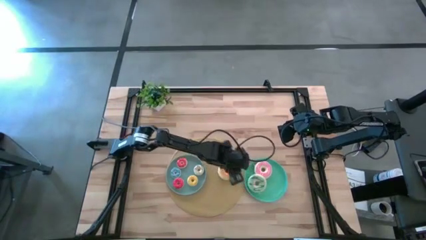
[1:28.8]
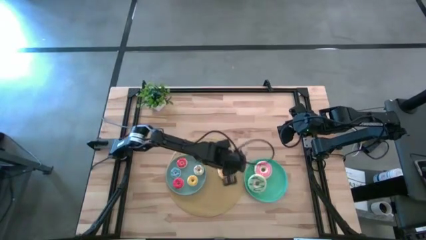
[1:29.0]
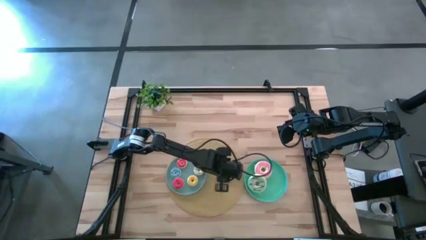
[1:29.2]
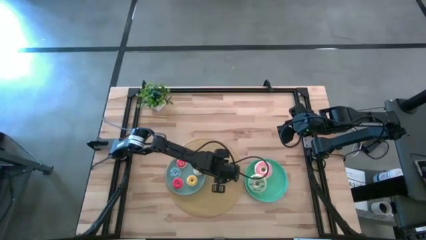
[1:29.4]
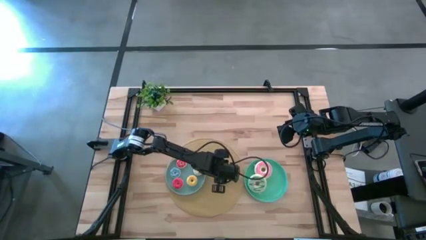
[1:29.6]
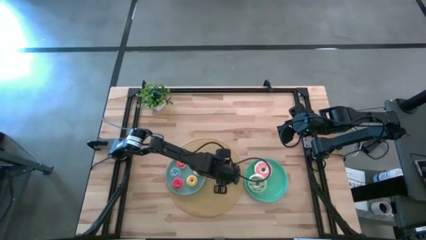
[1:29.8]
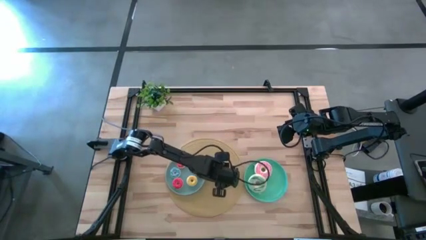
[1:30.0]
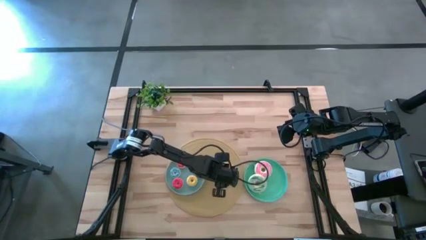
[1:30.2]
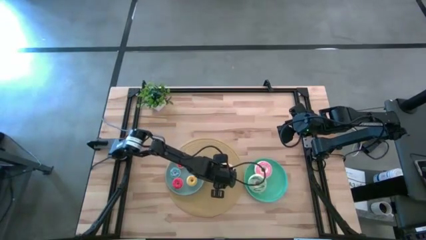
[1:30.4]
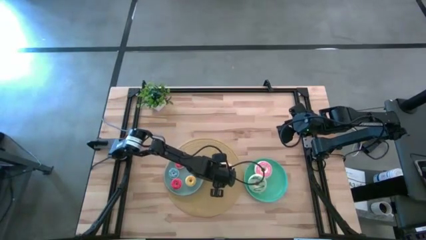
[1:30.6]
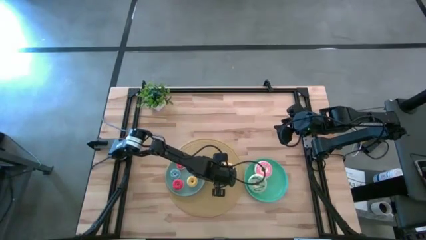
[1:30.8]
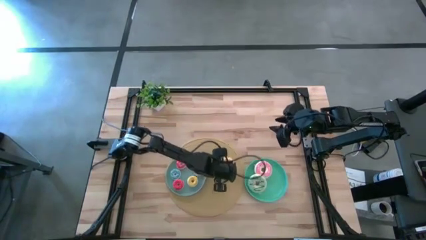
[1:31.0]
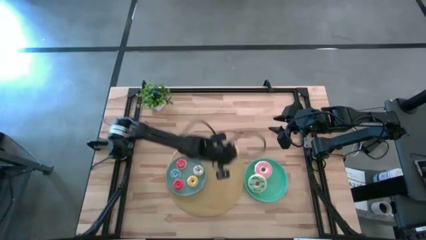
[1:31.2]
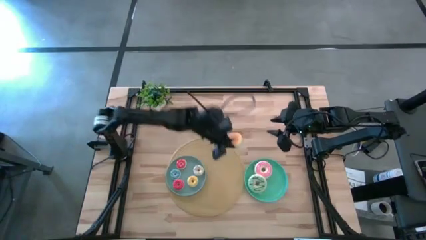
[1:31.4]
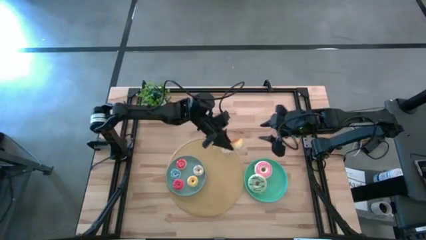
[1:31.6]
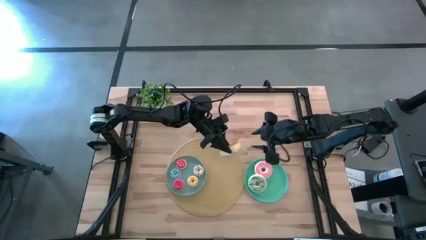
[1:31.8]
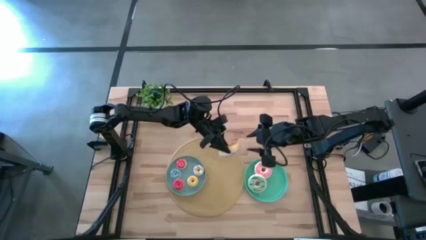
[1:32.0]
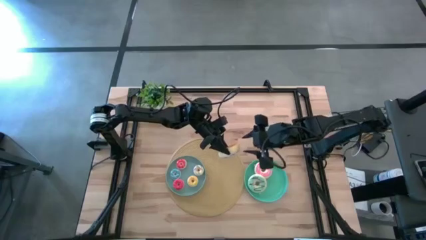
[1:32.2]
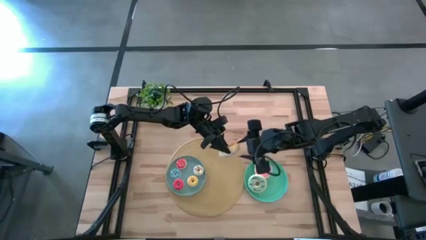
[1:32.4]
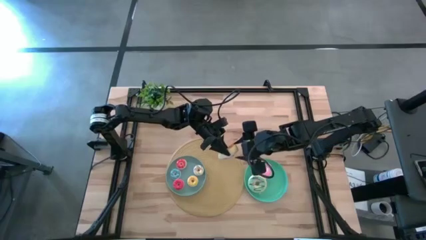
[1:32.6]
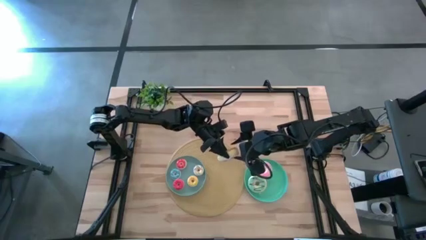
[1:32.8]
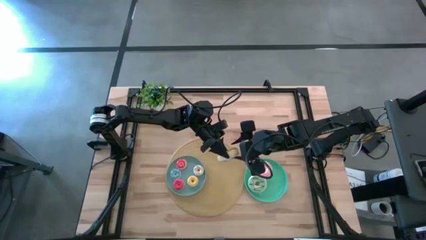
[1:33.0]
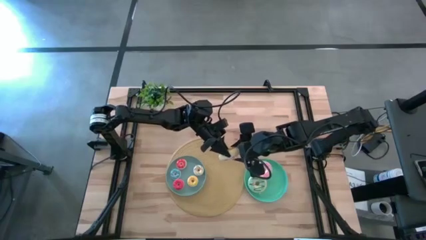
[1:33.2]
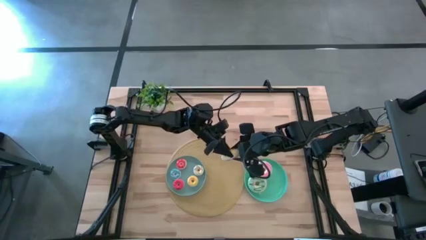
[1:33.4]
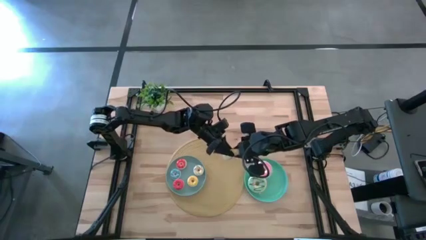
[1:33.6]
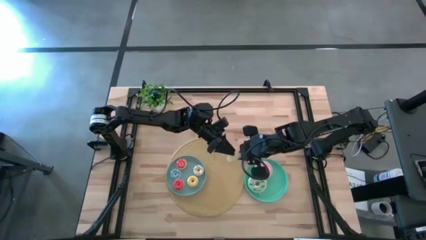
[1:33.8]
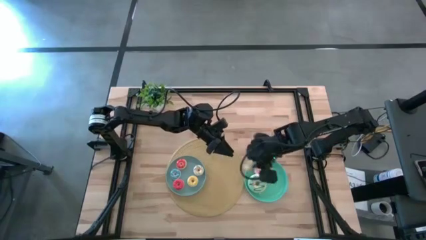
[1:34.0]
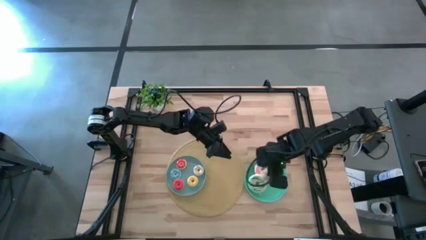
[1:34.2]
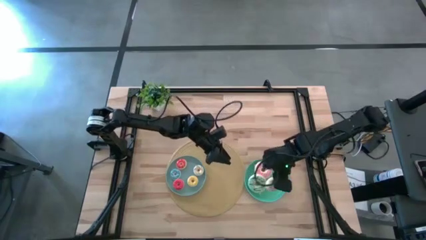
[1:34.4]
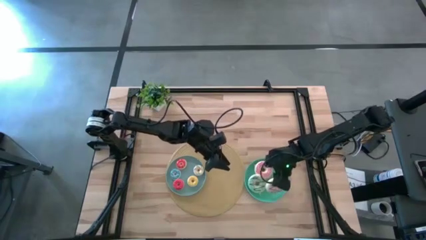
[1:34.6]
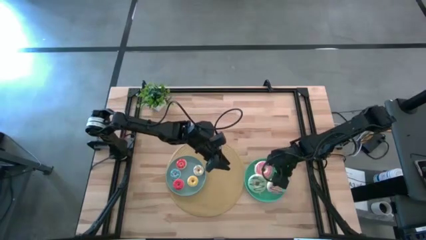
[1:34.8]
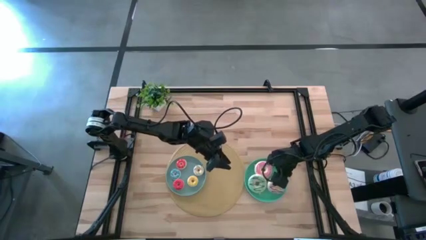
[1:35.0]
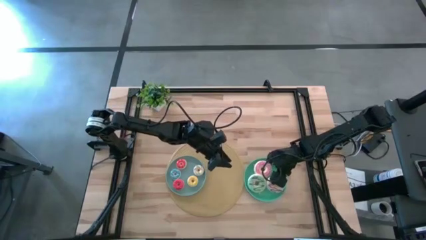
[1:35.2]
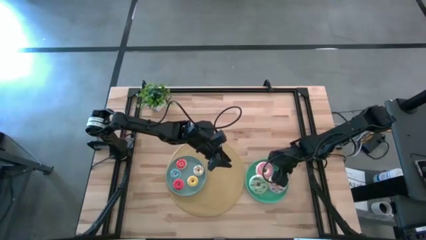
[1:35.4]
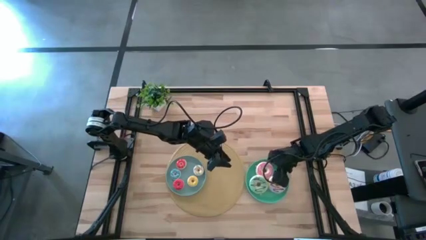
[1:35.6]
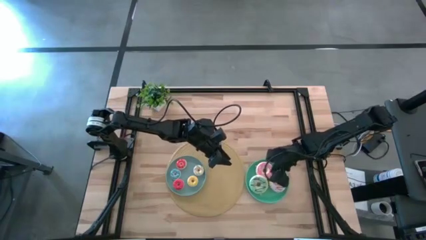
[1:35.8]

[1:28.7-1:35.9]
Task: Pick & Place donuts
Put the large white donut on the green plate

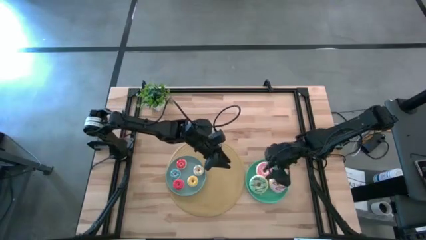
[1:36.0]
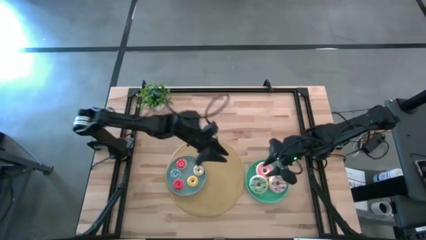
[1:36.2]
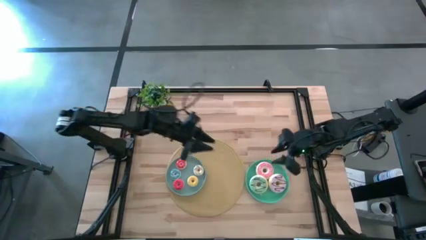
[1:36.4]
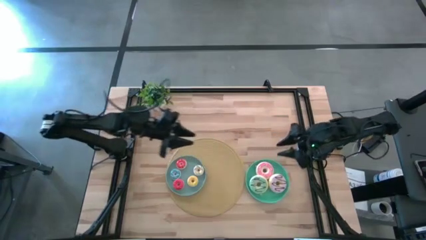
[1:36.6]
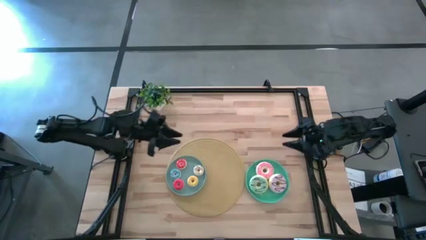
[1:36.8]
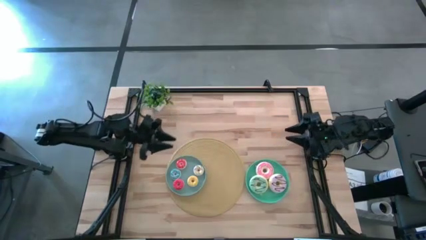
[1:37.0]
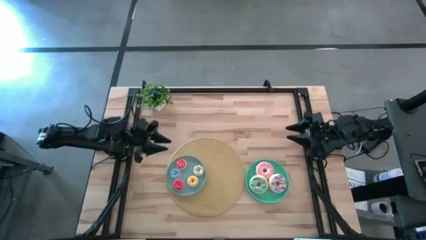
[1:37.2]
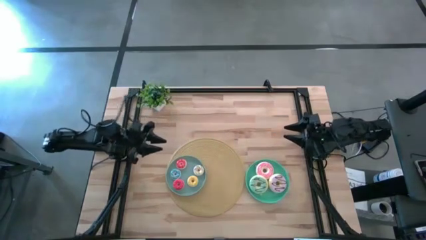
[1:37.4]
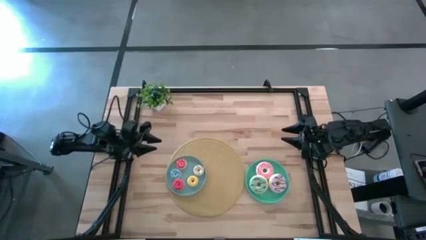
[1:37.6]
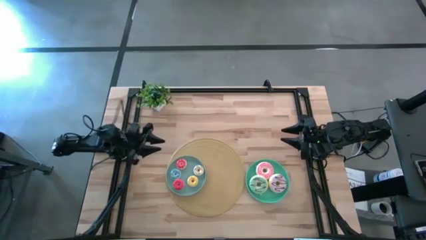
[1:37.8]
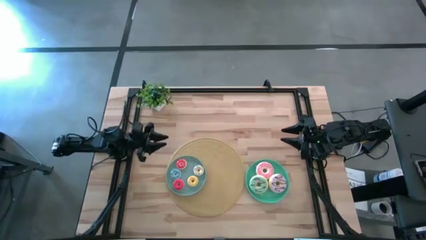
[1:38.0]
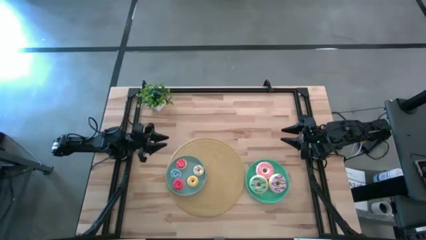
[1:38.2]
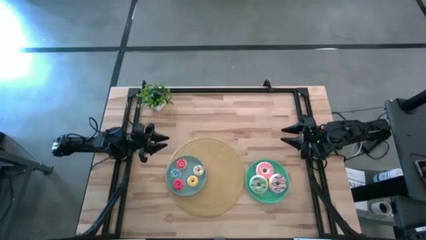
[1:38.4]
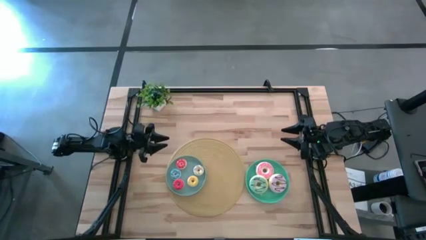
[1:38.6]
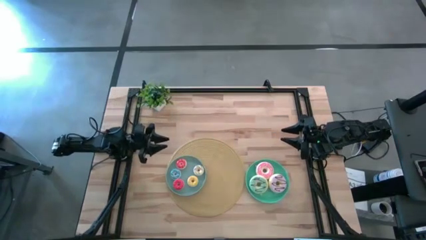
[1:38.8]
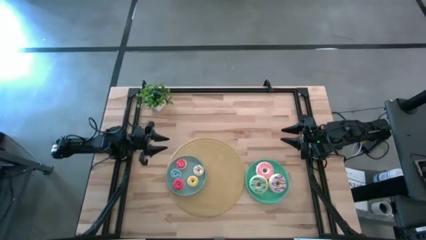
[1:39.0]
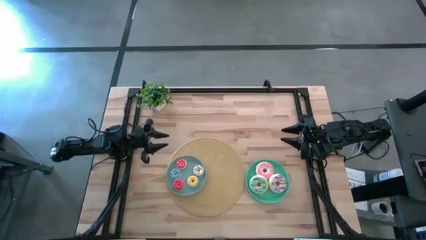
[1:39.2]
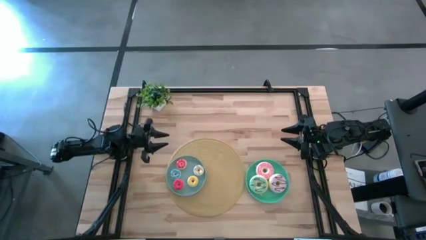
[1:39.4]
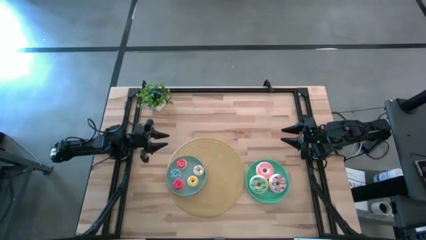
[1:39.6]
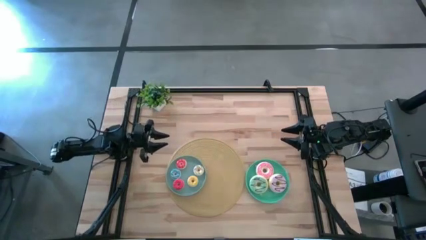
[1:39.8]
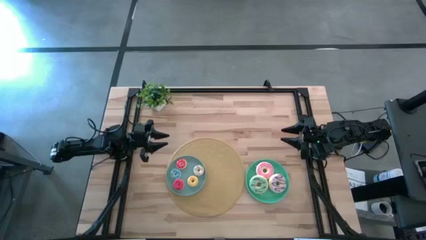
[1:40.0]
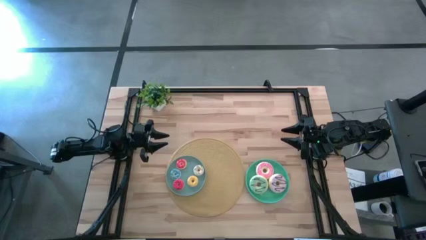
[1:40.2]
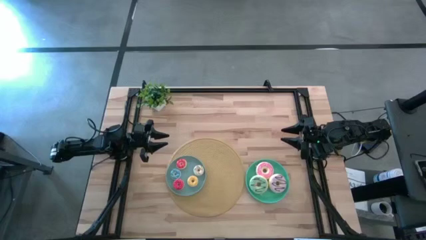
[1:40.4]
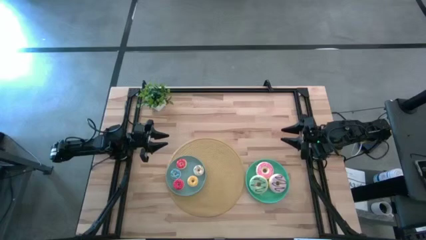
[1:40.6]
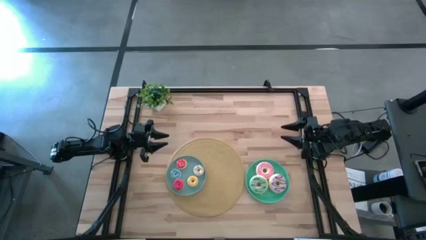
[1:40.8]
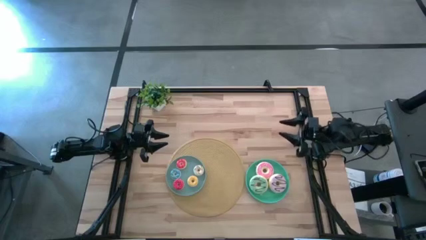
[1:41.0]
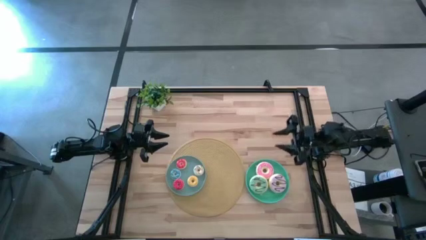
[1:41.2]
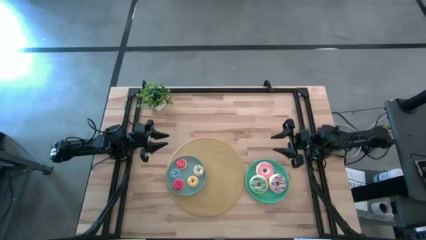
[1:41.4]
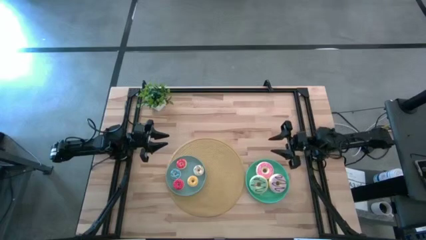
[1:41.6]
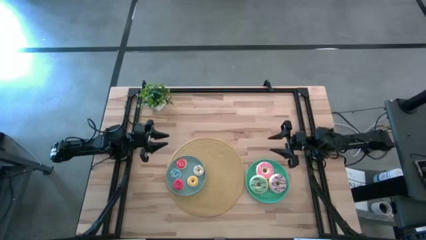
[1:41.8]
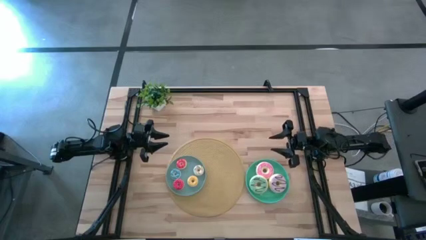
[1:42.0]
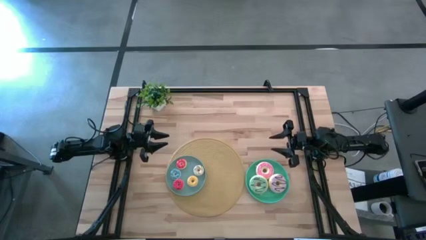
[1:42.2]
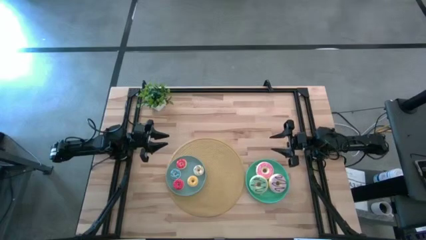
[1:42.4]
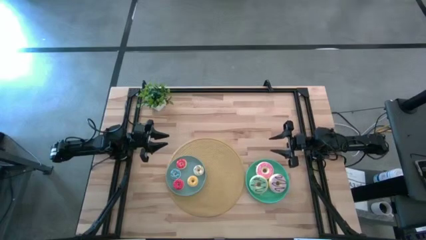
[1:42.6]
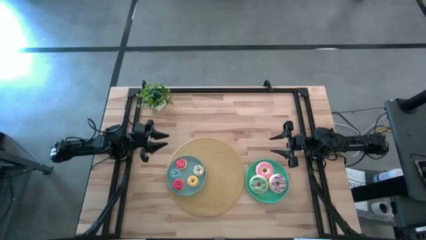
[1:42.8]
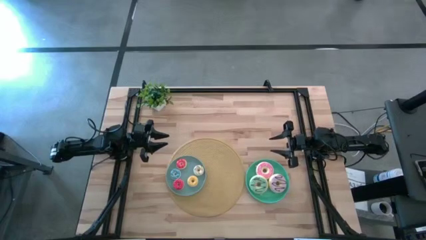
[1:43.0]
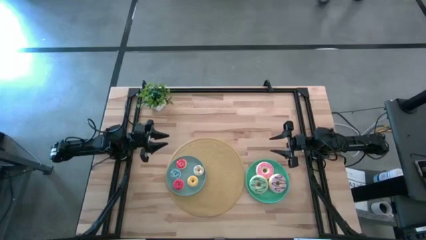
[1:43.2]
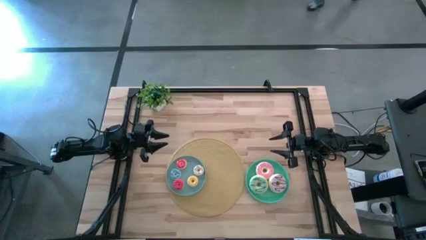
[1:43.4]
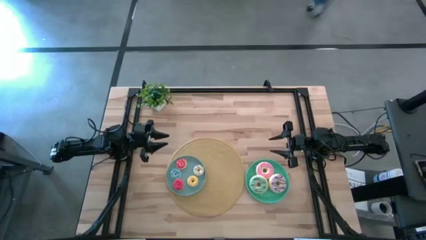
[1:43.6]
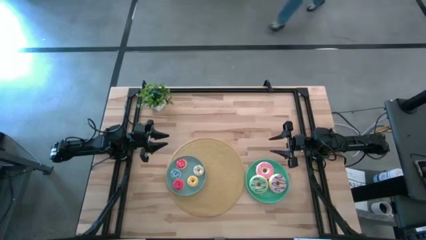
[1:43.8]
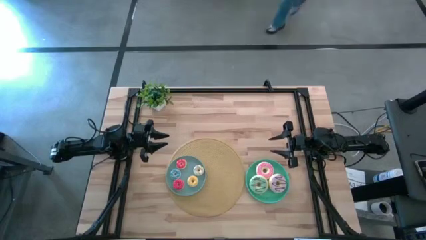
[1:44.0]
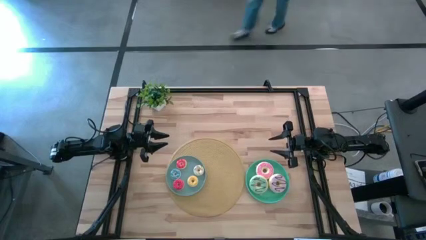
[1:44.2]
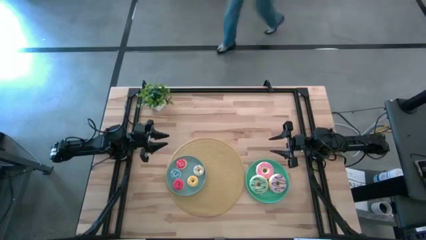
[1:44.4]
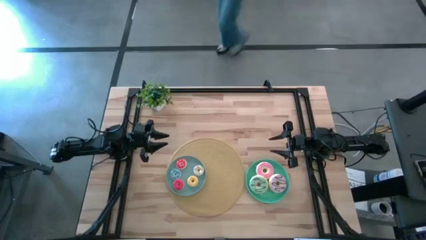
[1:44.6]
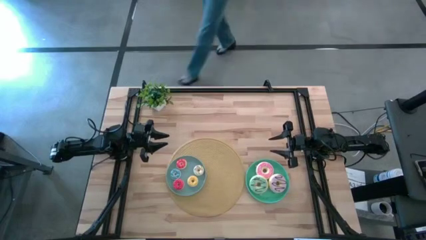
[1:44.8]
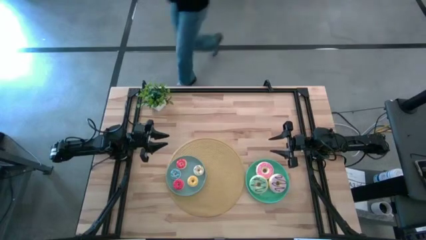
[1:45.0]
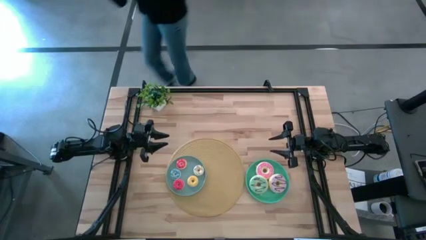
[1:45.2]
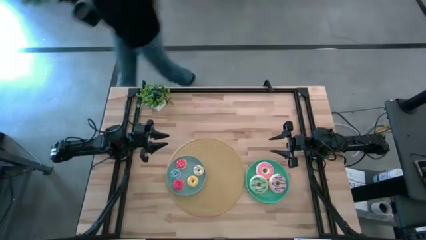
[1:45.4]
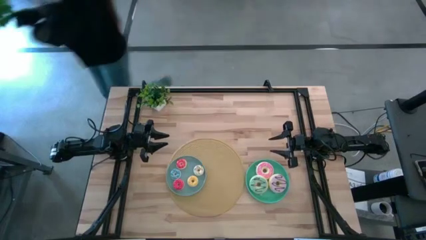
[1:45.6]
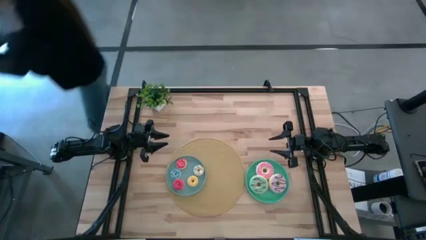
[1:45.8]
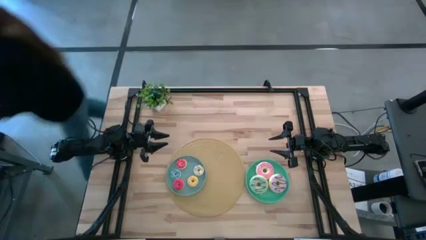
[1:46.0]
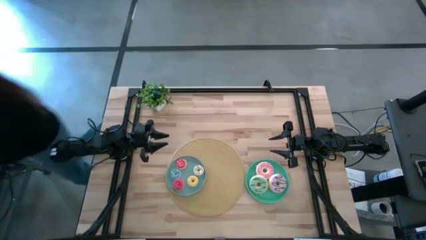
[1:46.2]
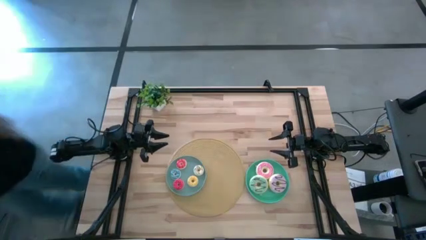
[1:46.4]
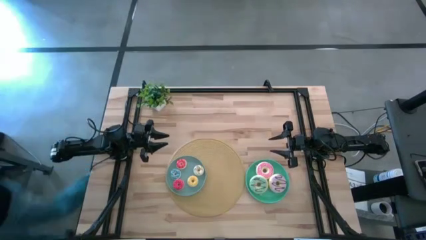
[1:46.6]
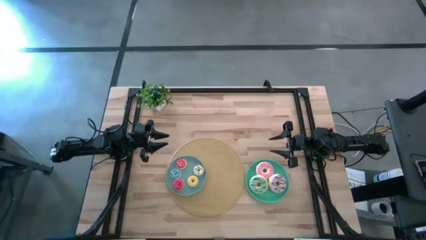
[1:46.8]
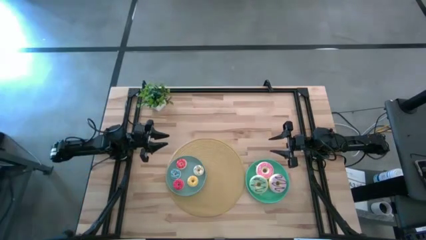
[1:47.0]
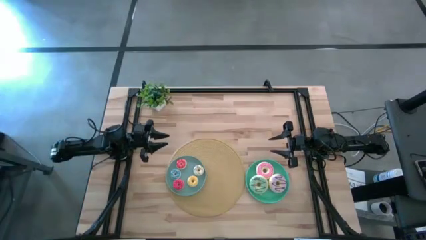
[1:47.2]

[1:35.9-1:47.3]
Return to Home Position
